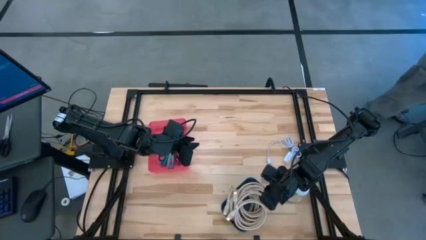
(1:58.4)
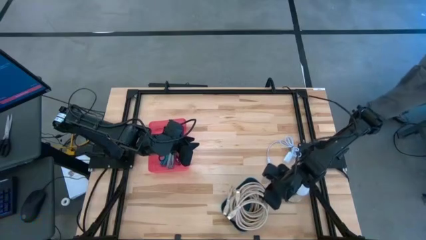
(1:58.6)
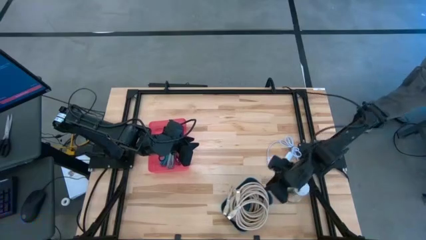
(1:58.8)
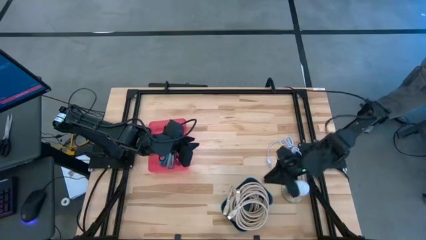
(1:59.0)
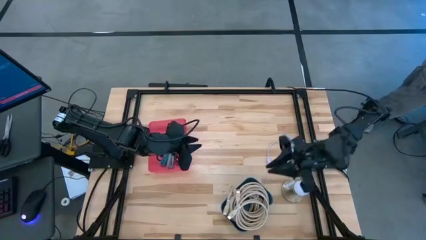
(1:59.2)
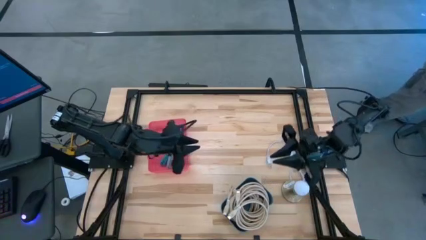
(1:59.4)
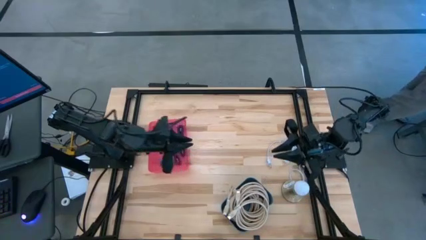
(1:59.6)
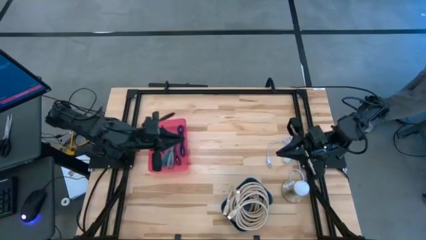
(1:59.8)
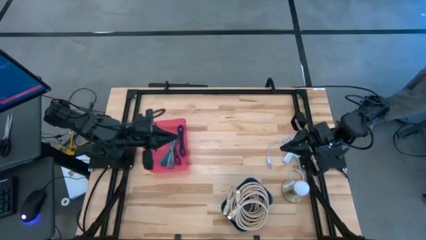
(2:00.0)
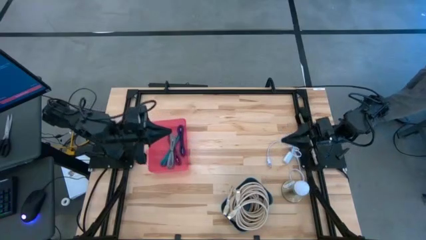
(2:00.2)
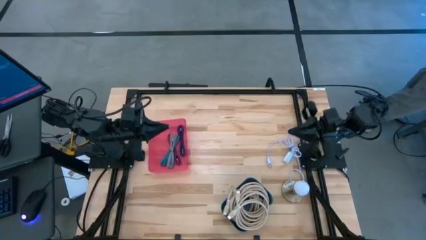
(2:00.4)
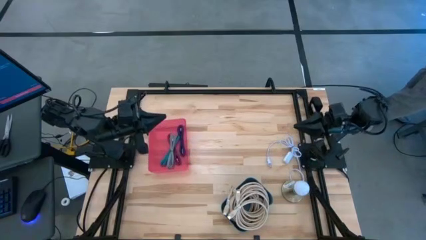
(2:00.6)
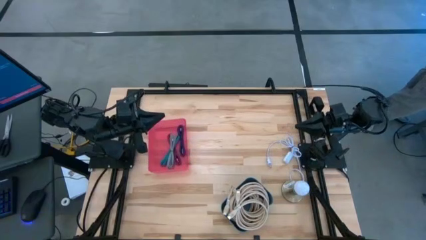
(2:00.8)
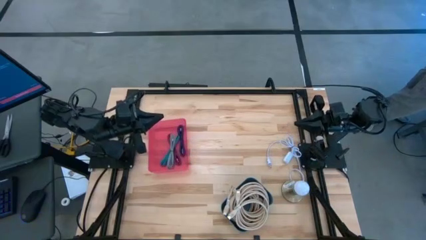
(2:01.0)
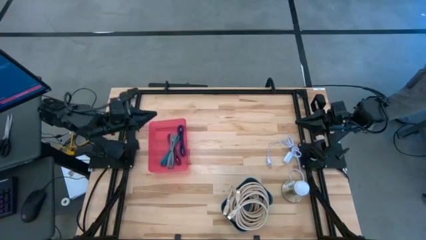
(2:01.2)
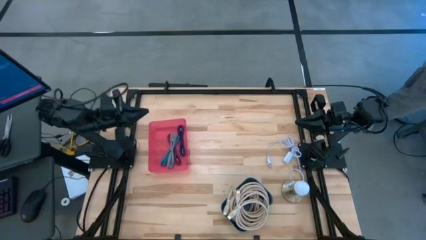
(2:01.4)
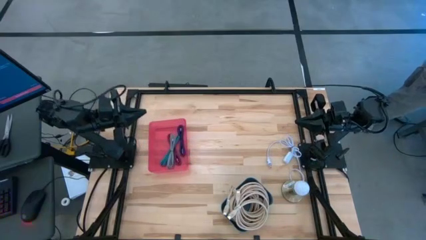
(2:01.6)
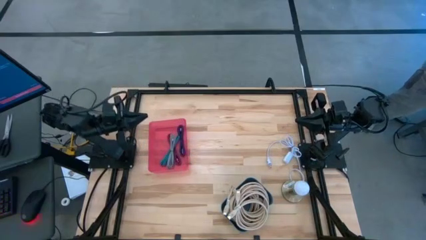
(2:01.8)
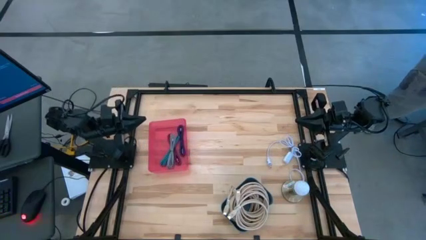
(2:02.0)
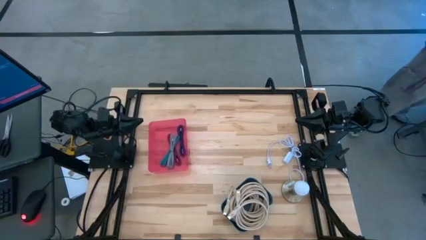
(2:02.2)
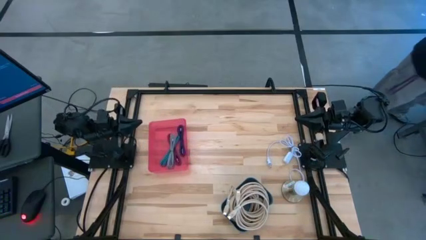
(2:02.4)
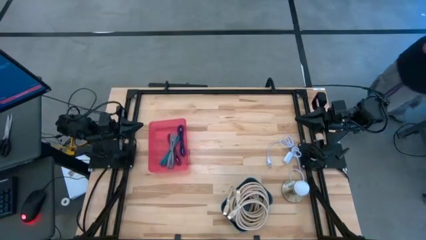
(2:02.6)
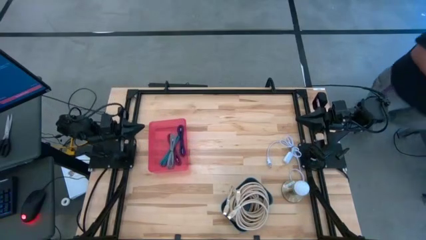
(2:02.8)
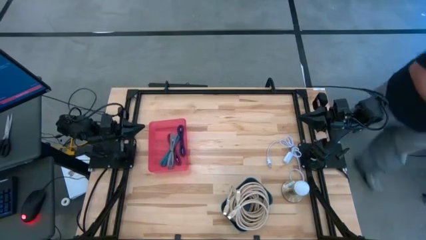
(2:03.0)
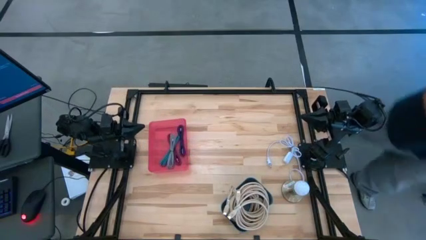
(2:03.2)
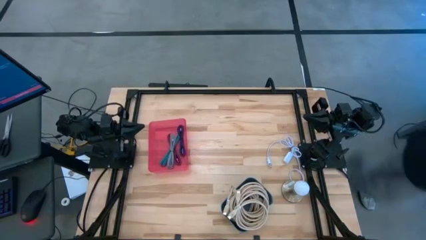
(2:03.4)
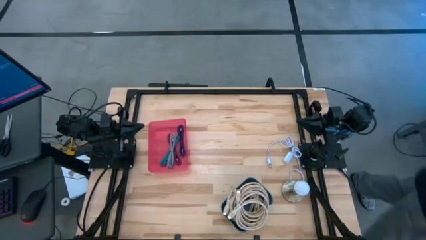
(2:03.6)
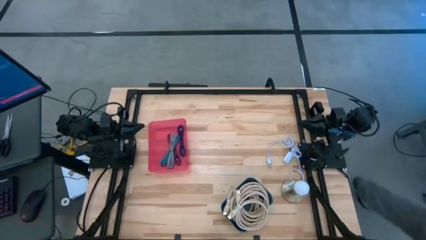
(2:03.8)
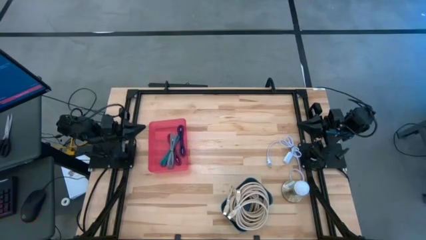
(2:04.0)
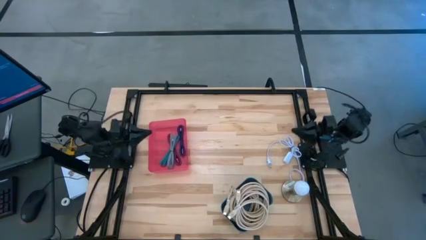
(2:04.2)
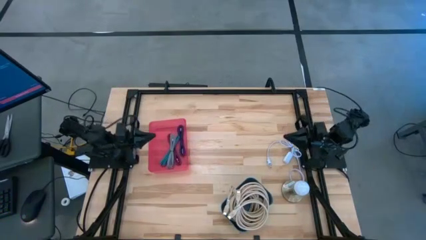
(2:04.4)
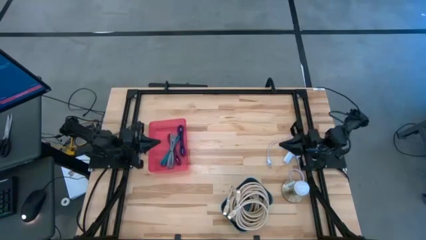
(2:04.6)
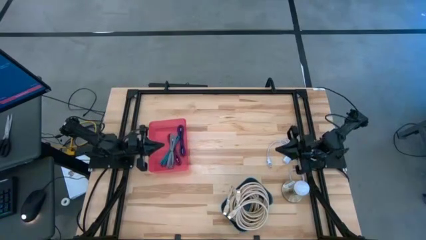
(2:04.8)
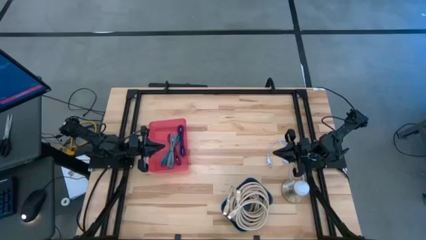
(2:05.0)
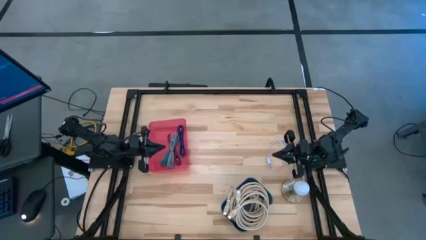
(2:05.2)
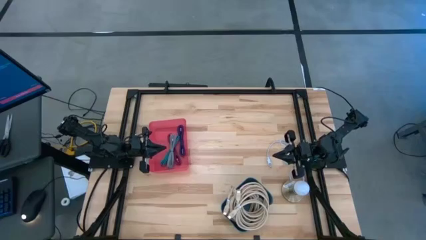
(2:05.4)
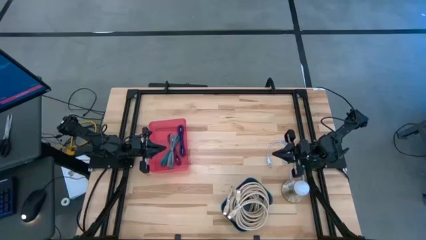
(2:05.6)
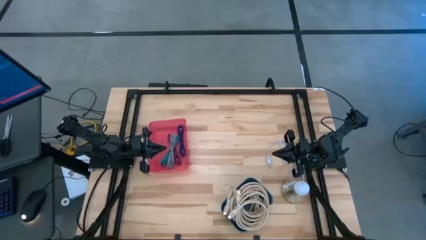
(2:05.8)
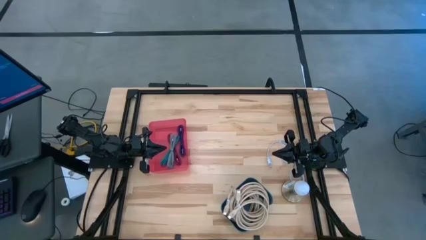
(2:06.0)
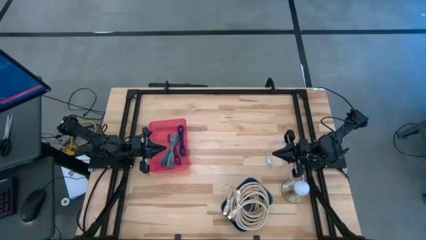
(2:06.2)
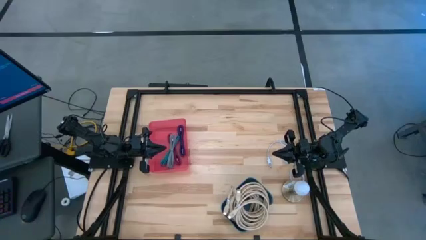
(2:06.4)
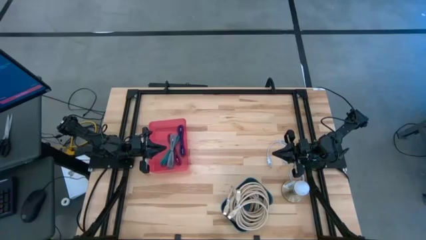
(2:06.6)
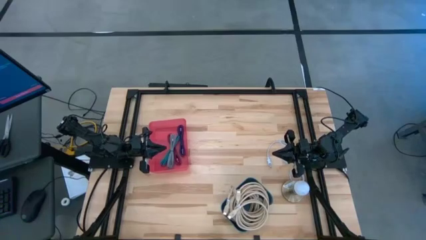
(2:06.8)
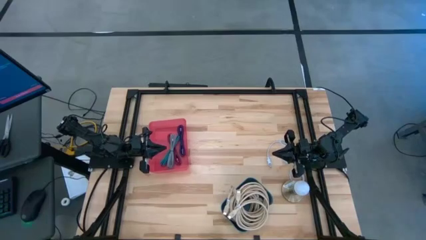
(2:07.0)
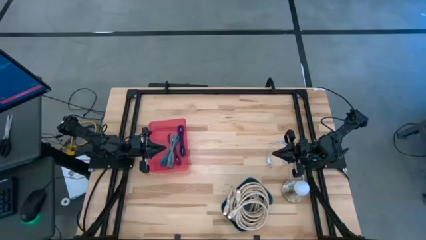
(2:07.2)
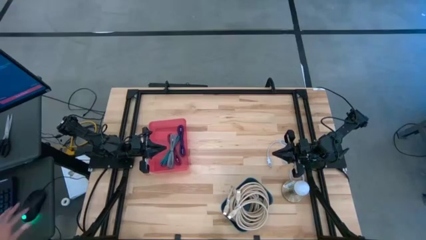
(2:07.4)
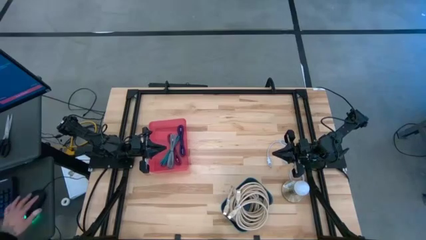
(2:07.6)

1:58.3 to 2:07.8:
Task: Pick & Place USB Port
Return to Home Position

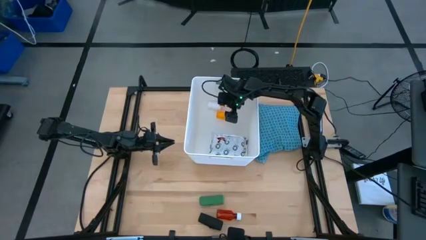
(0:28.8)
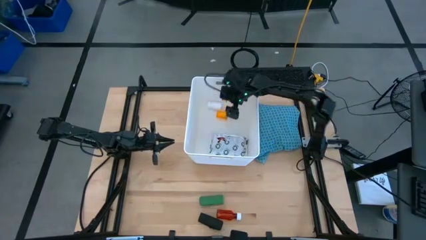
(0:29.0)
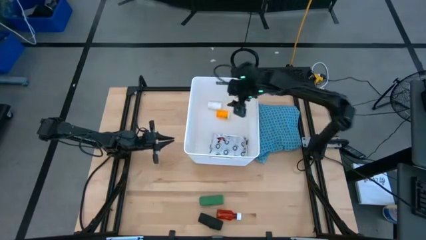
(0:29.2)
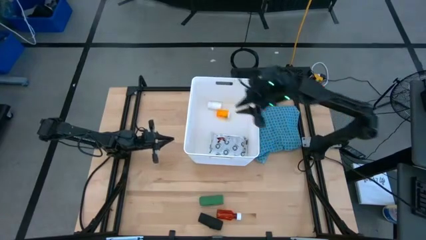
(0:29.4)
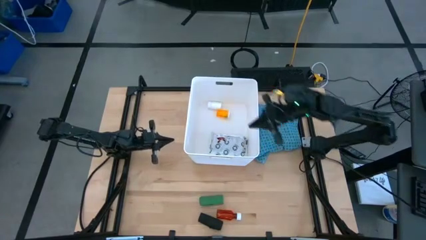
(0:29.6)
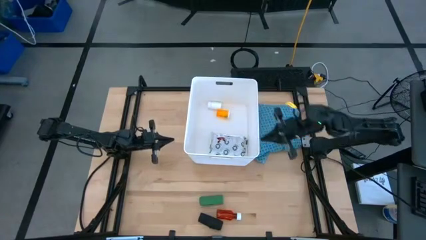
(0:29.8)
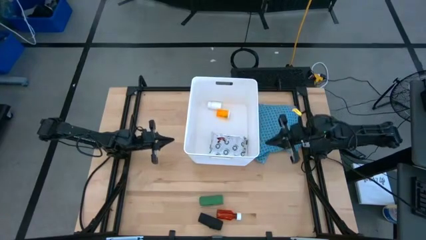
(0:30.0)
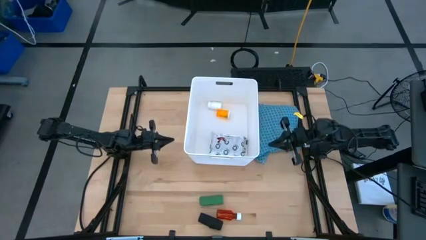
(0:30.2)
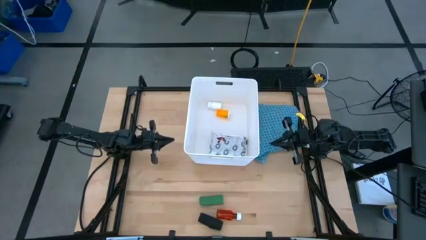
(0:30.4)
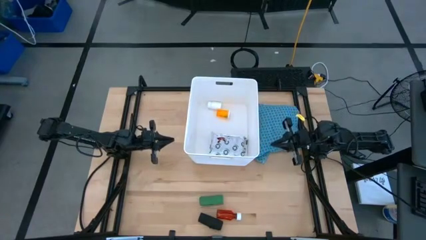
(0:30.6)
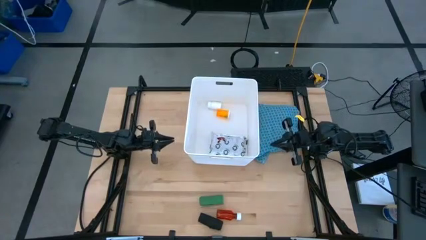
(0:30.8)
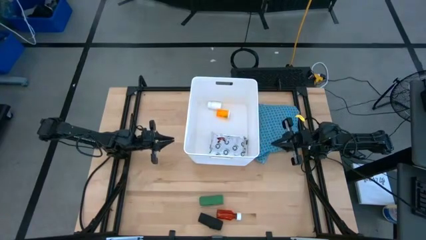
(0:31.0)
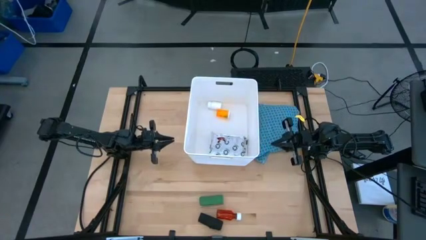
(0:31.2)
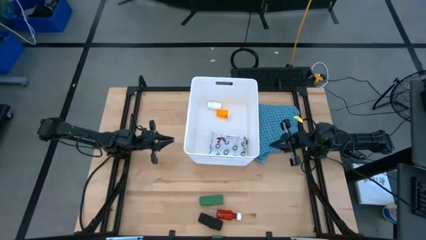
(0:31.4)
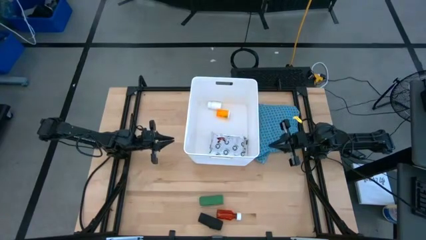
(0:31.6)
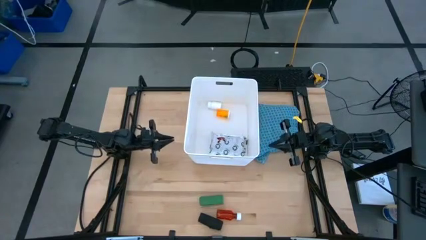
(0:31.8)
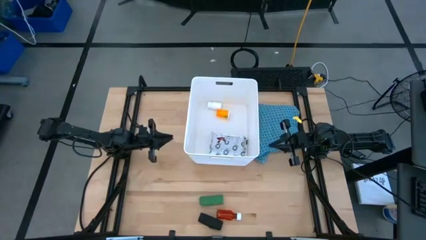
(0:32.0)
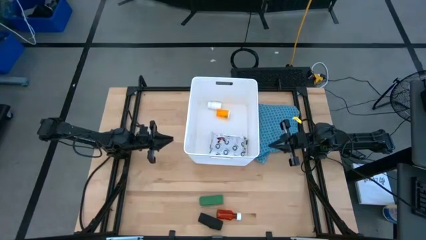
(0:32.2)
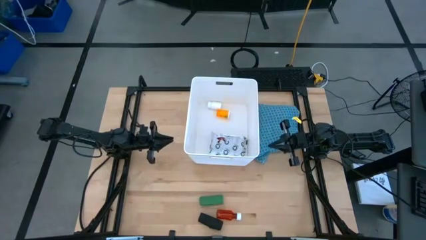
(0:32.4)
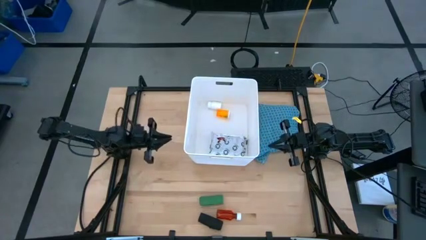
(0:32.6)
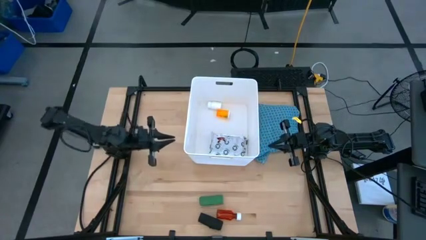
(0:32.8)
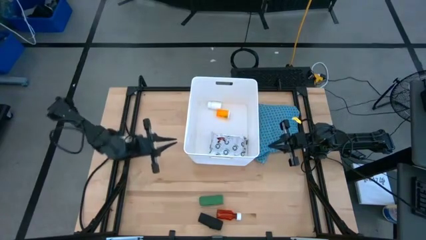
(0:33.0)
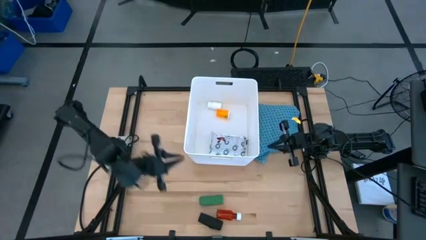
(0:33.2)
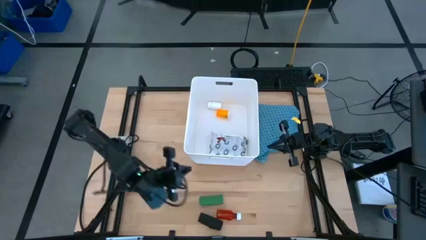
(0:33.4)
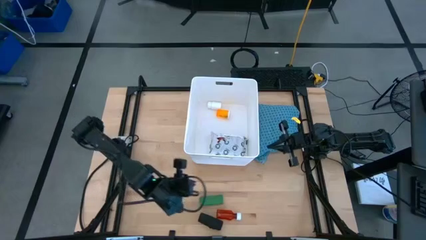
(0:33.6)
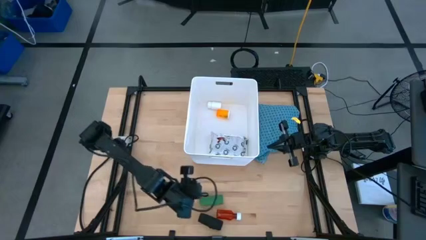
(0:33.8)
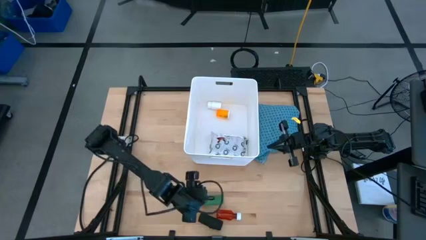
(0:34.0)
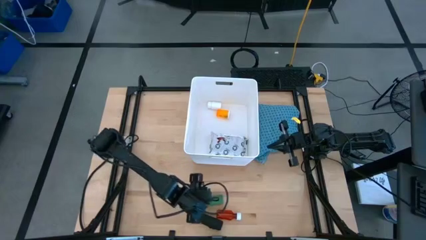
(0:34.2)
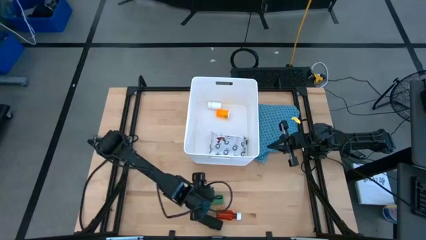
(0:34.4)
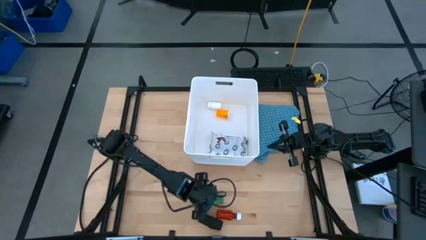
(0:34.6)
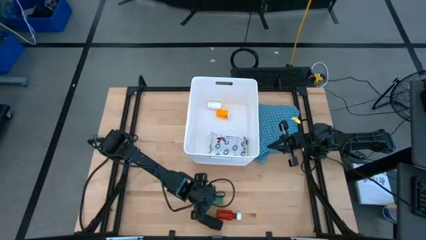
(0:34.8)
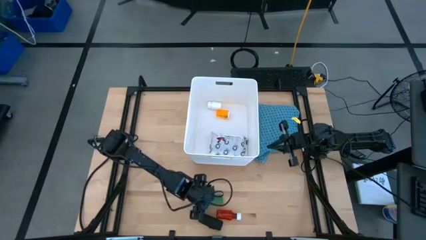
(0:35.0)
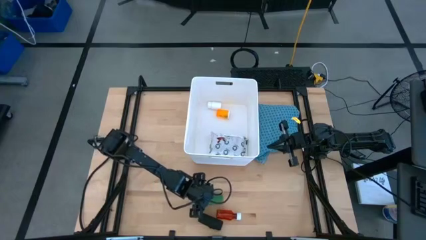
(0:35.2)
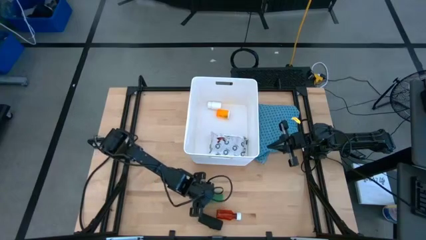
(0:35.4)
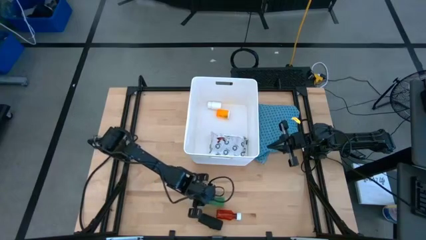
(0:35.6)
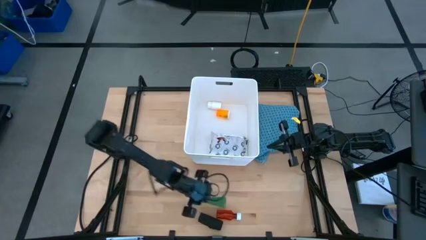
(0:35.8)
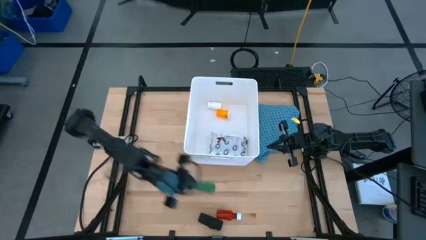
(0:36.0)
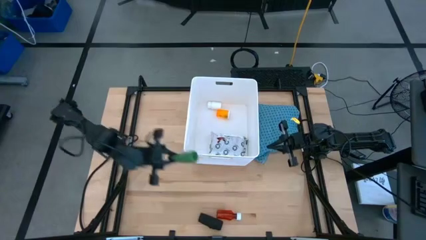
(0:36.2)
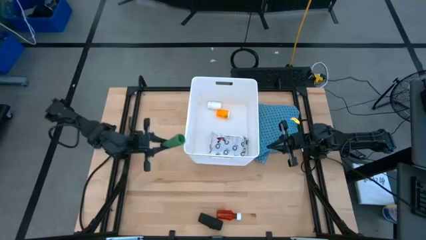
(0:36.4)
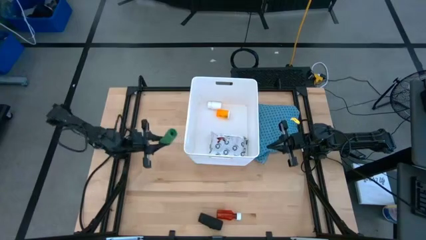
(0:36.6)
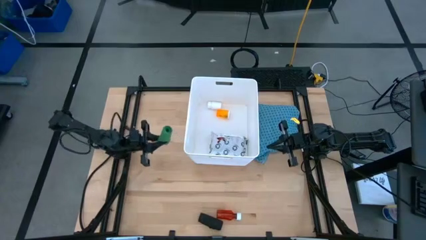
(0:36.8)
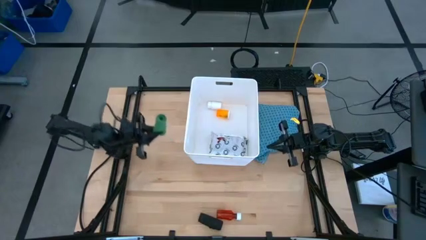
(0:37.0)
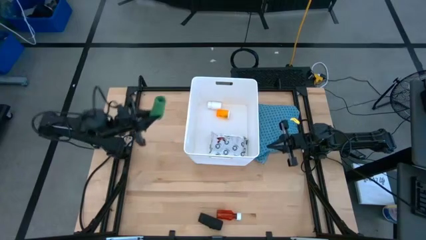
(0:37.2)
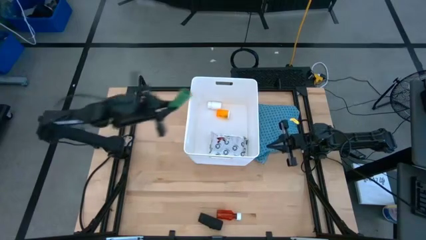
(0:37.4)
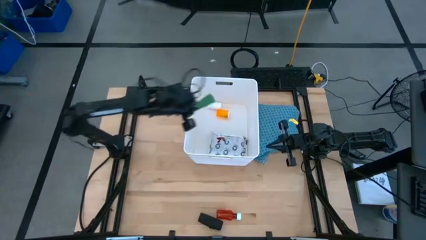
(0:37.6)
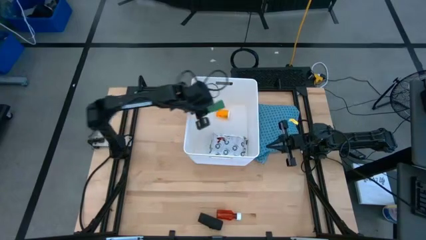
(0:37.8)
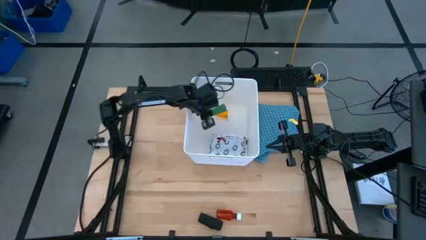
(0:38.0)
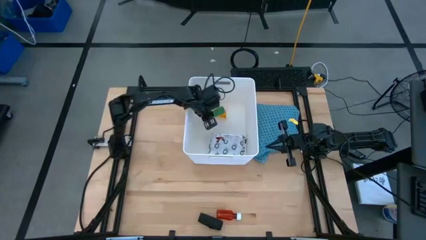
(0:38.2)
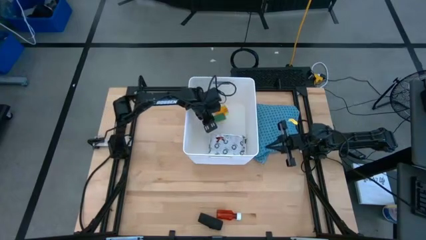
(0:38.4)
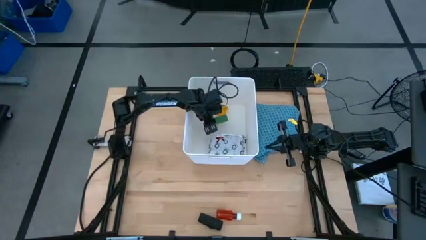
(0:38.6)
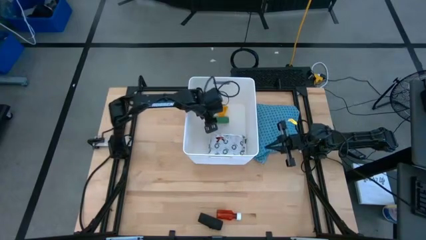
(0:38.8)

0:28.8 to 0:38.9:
Task: Pick & place medical supplies in basket/bin
Put the green bandage into the white bin
